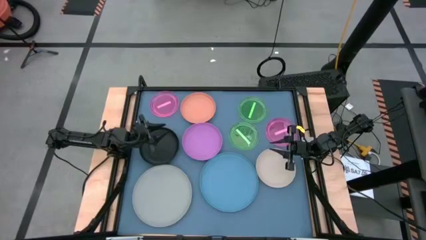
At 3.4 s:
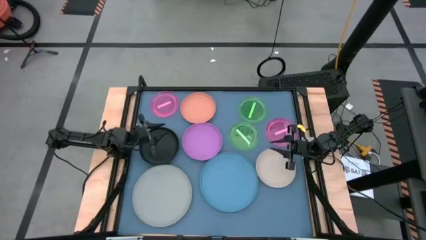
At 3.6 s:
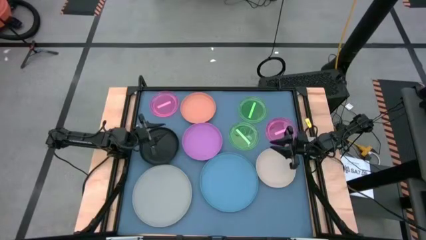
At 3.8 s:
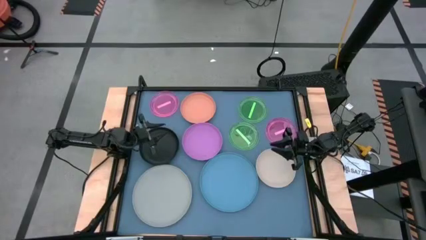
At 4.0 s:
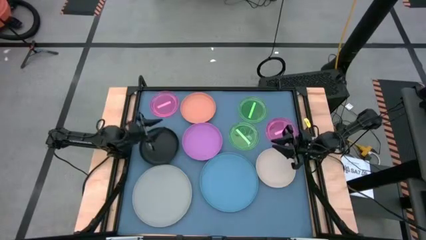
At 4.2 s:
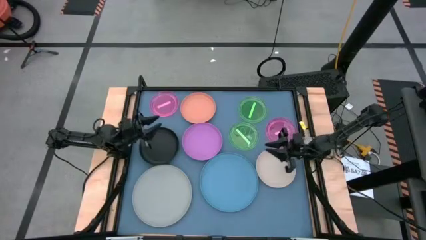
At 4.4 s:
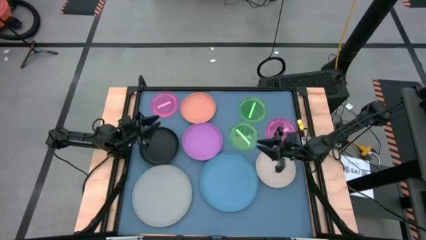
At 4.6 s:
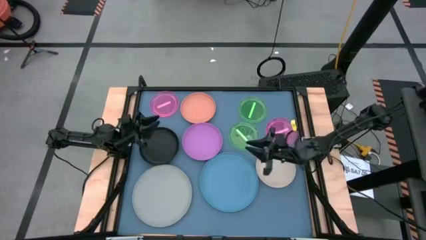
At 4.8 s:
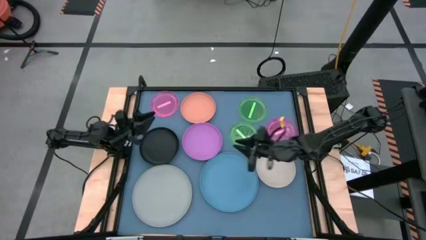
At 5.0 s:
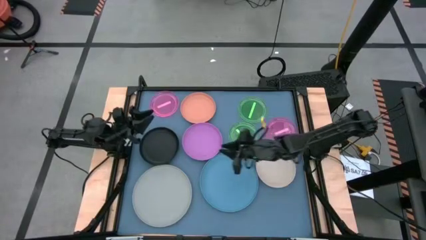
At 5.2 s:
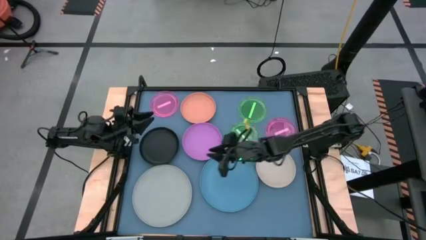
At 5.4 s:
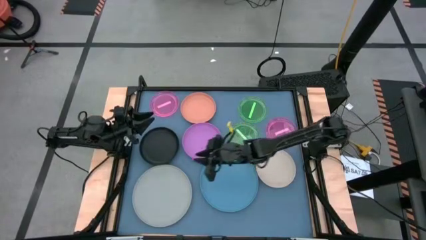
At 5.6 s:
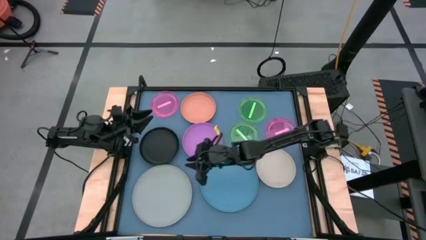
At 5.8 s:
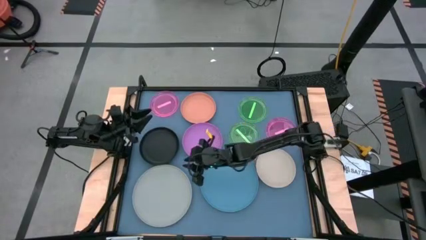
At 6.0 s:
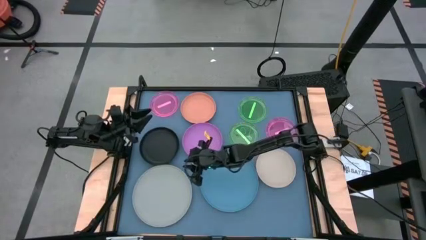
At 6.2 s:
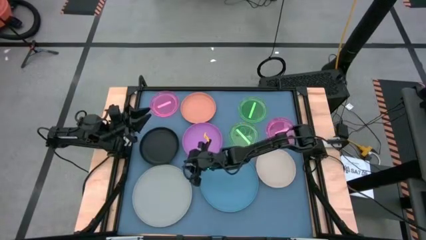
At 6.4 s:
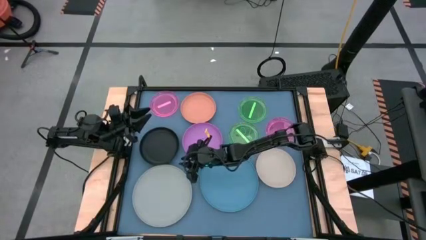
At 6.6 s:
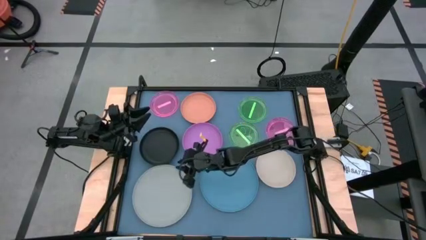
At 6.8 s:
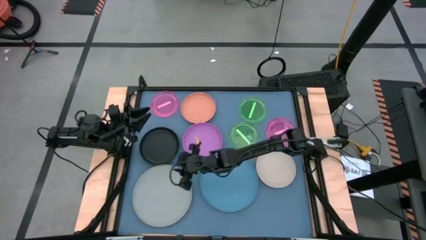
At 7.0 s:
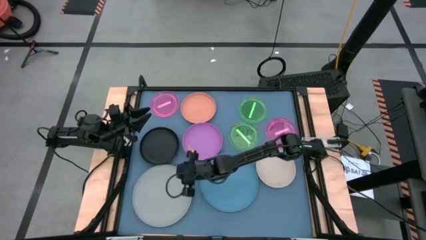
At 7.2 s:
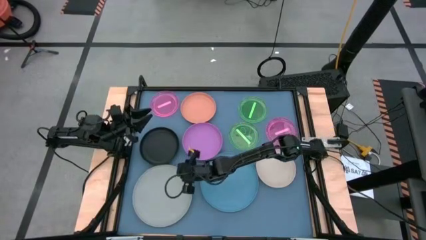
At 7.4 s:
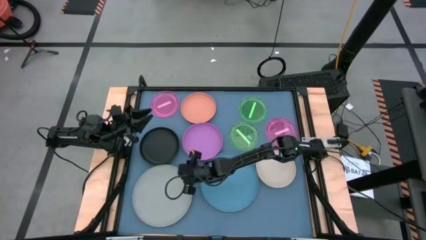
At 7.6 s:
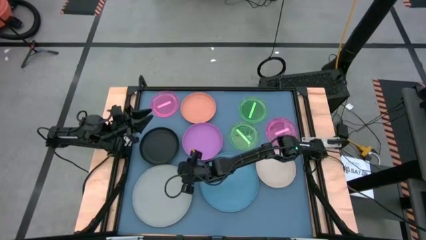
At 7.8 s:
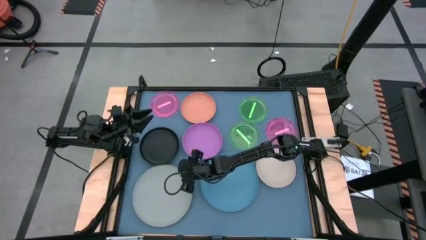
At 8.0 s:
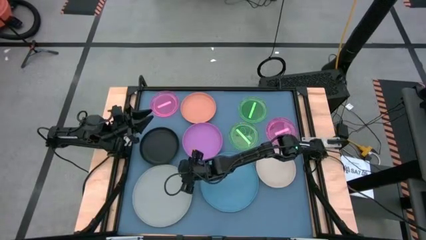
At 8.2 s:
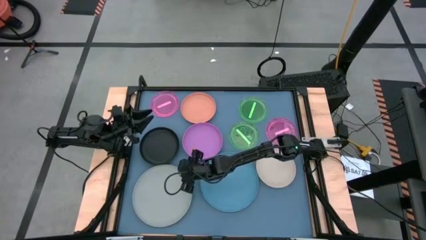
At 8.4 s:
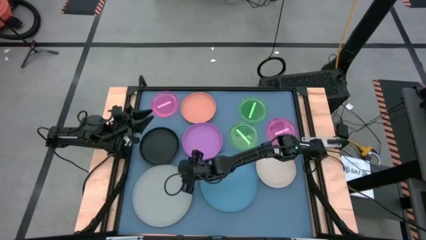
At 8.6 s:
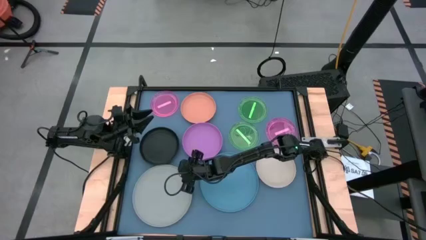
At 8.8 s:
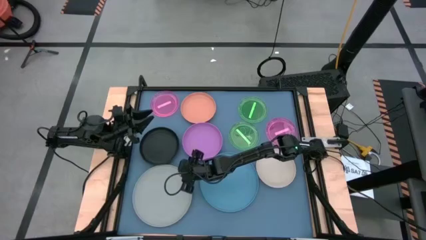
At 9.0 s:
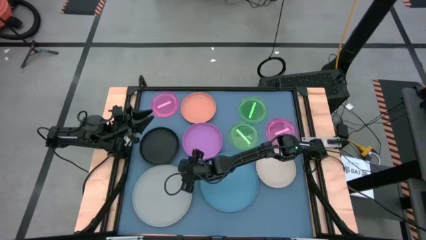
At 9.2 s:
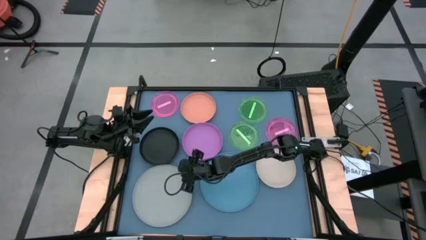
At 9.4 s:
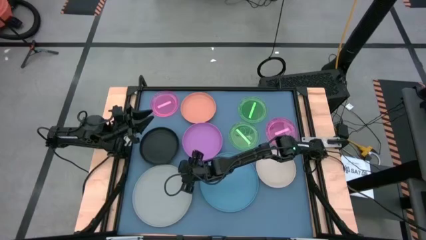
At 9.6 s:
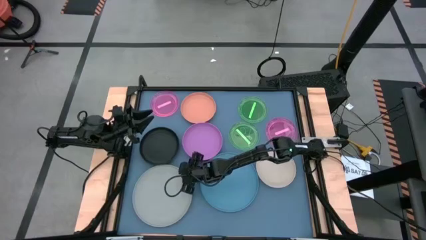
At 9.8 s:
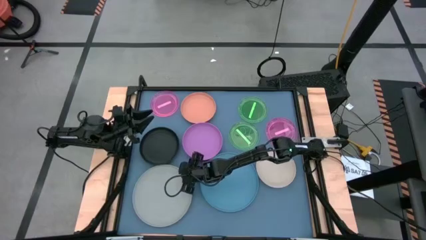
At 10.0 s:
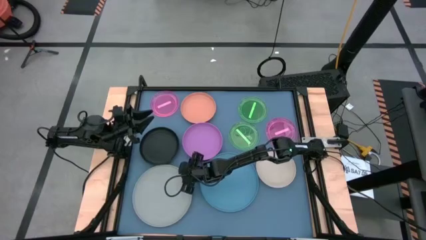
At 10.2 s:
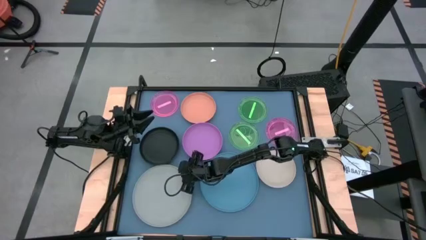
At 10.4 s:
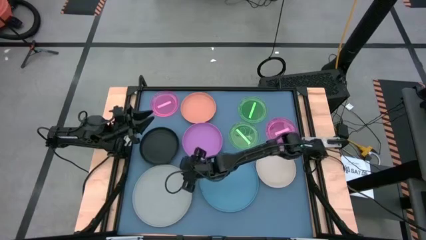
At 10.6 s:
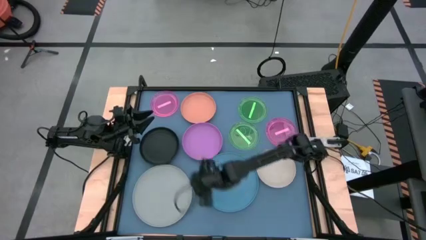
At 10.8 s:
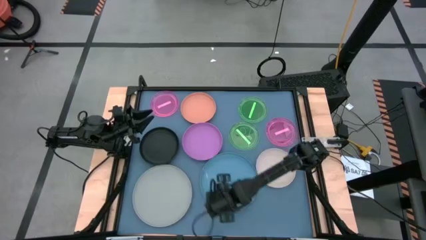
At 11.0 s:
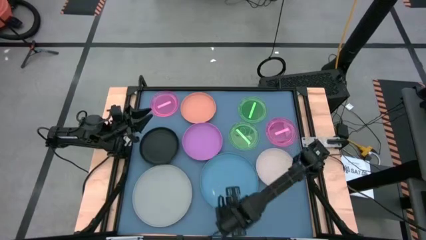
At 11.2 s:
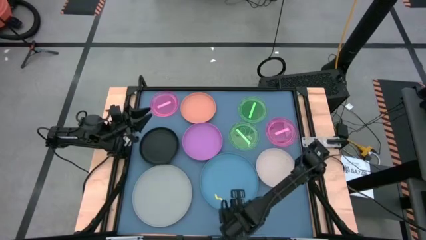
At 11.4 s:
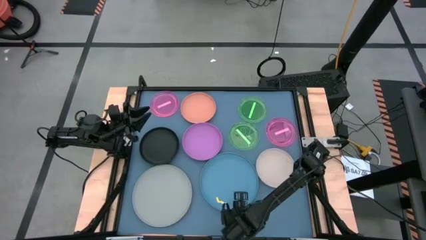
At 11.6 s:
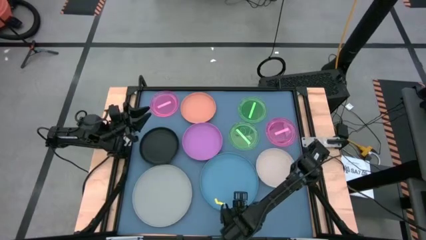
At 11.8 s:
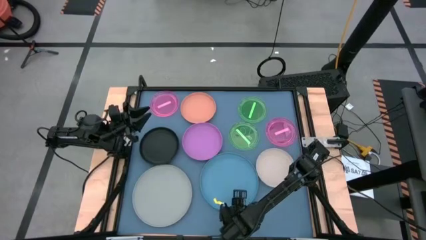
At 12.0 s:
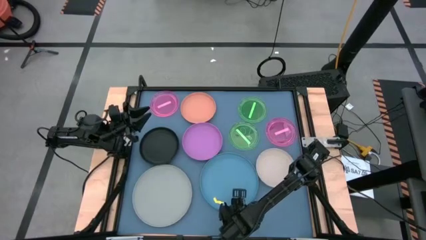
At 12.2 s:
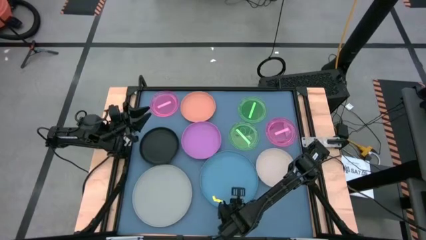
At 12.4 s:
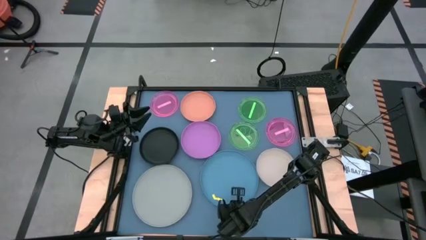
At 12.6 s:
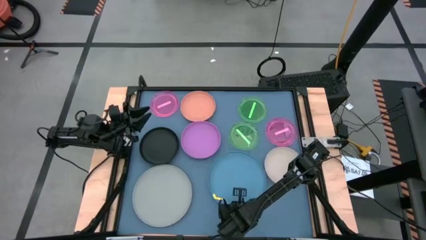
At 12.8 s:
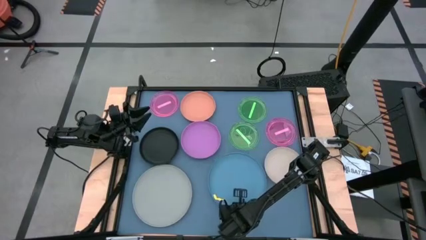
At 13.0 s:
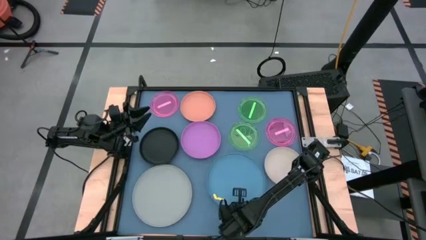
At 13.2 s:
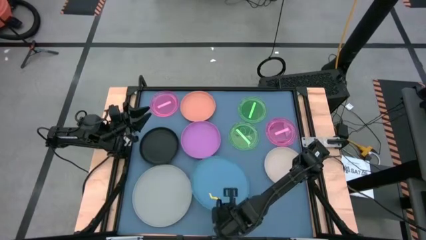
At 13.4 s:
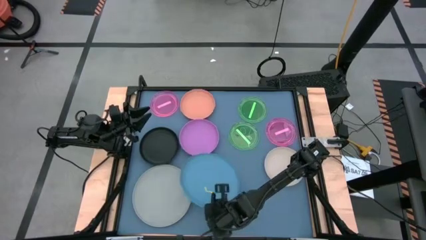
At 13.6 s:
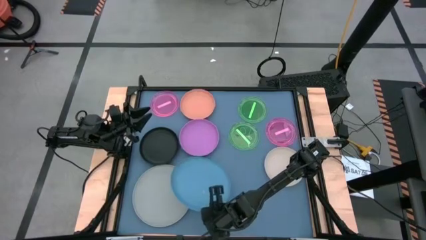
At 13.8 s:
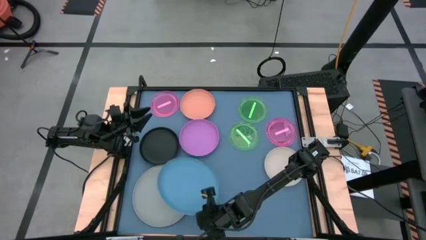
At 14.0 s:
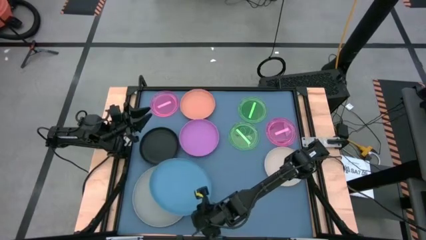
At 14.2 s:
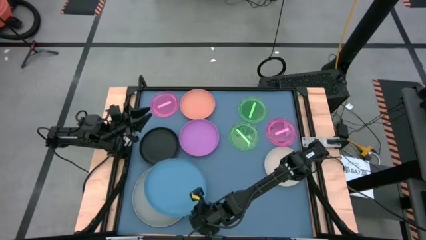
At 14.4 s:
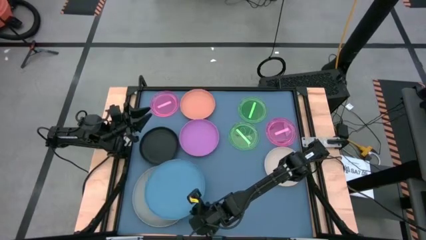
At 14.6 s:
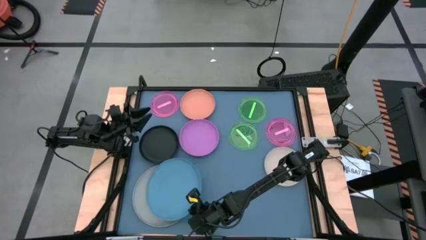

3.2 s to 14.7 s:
Task: Stack plastic plates
Stack the blue plate on top of the gray plate

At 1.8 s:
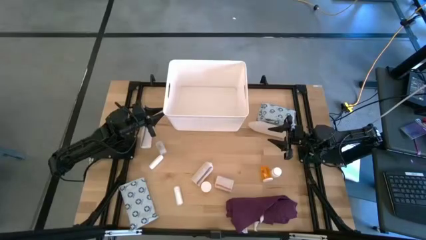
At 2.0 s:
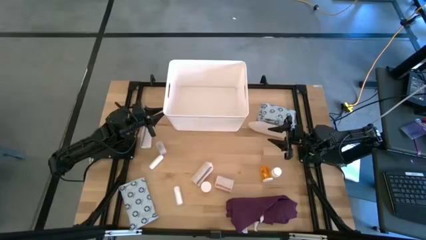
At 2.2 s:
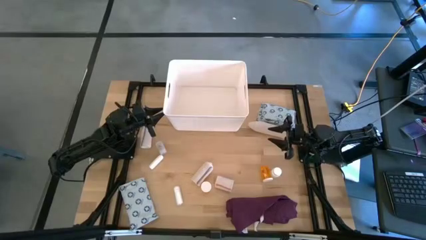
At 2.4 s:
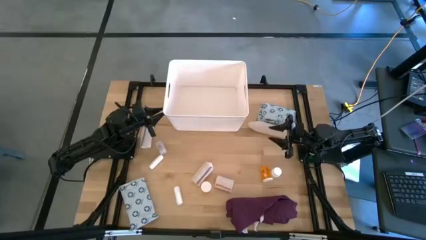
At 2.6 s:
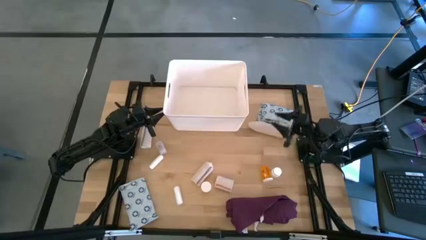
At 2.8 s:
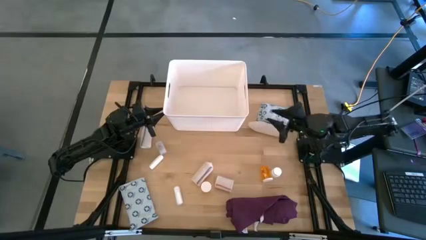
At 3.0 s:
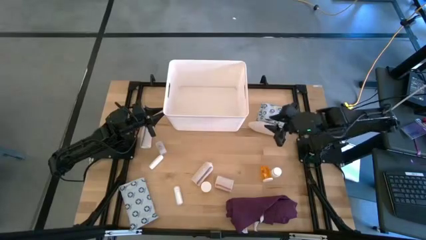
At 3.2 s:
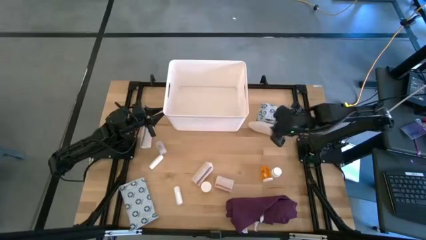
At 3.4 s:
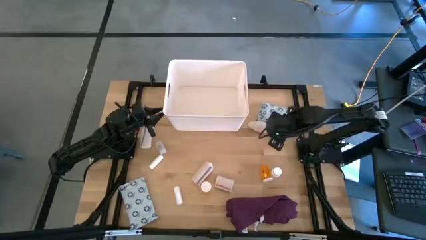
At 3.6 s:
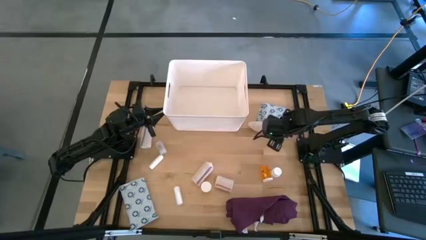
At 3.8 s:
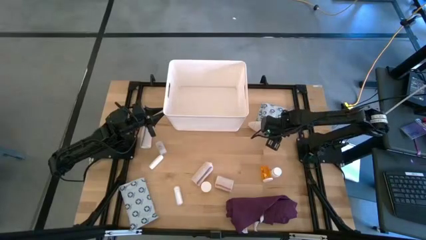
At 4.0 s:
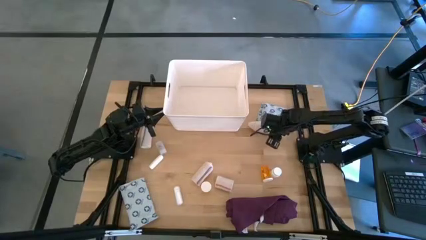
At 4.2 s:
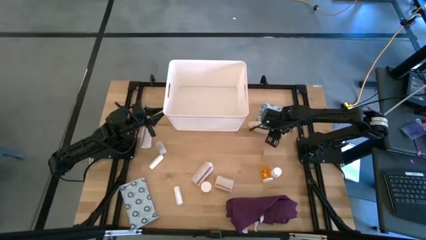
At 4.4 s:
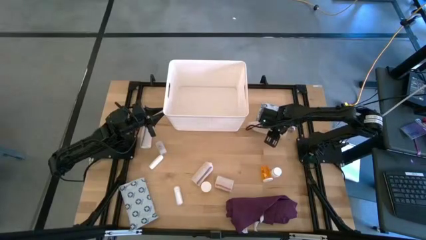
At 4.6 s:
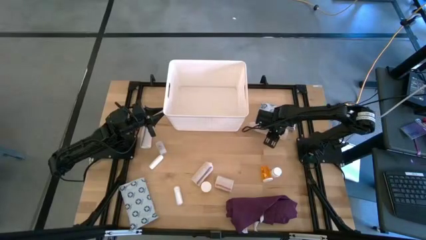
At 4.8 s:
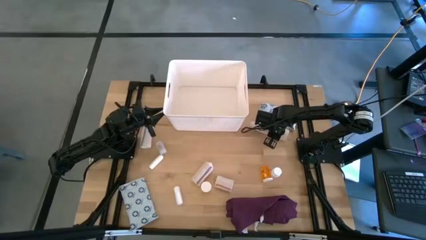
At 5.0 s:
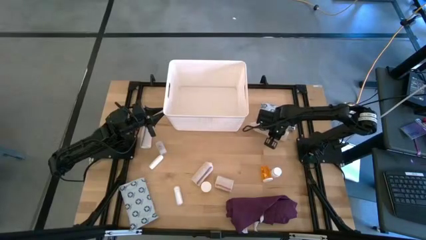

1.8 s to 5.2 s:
Task: Pick & place medical supplies in basket/bin
Put the light brown and green bandage into the white bin
